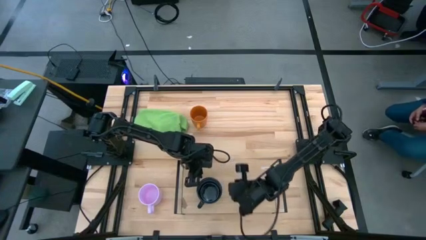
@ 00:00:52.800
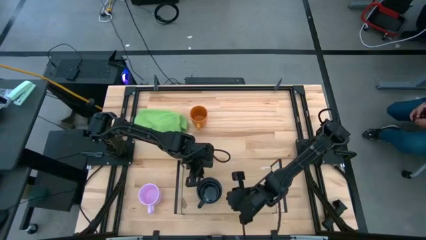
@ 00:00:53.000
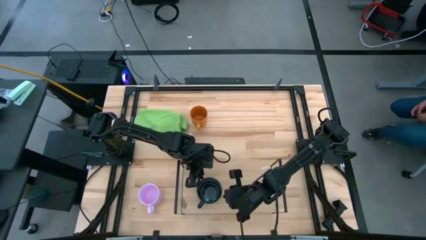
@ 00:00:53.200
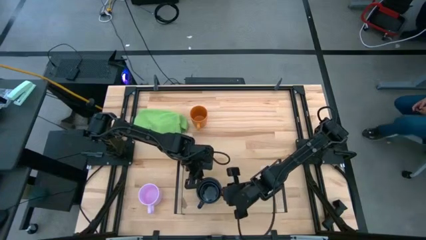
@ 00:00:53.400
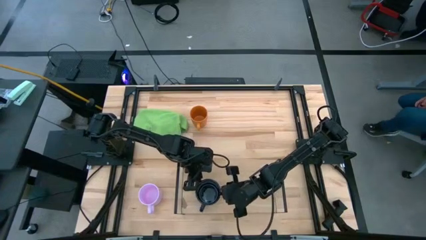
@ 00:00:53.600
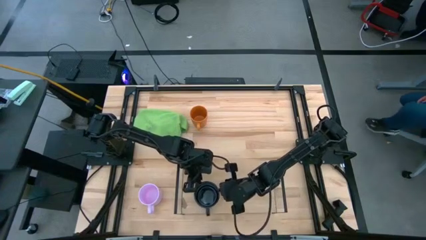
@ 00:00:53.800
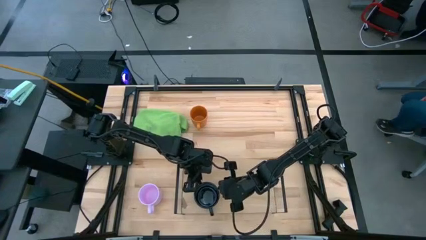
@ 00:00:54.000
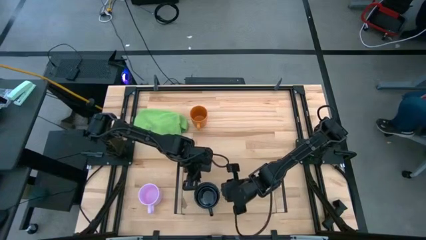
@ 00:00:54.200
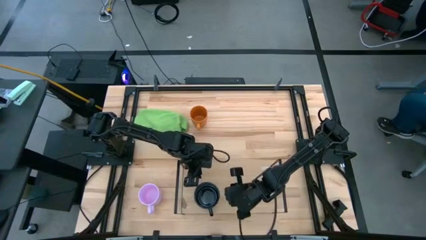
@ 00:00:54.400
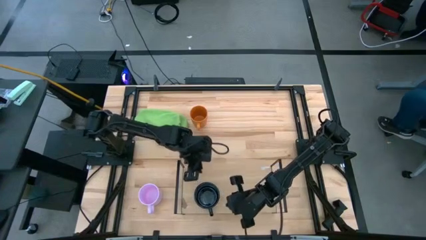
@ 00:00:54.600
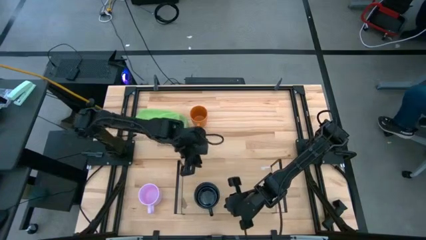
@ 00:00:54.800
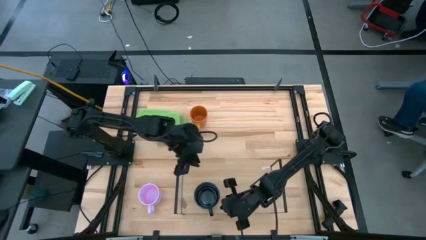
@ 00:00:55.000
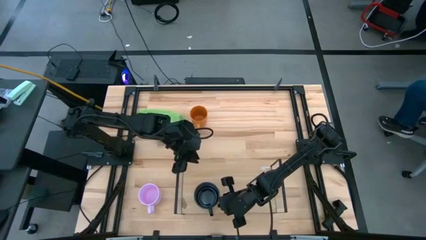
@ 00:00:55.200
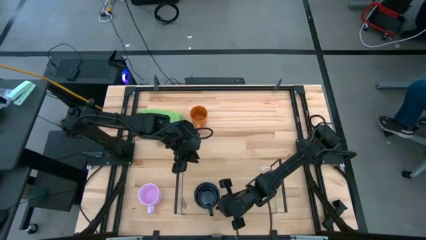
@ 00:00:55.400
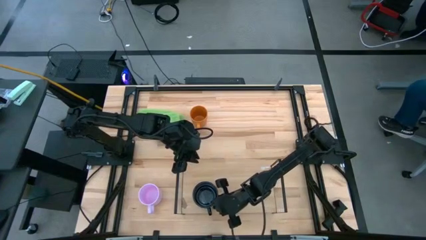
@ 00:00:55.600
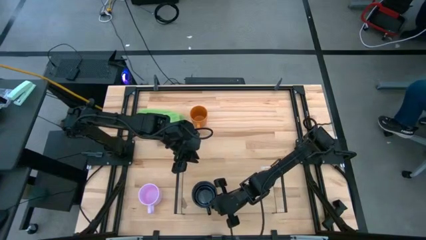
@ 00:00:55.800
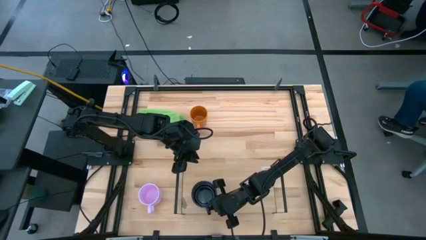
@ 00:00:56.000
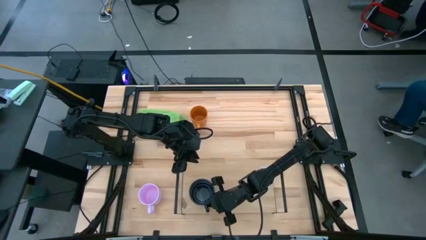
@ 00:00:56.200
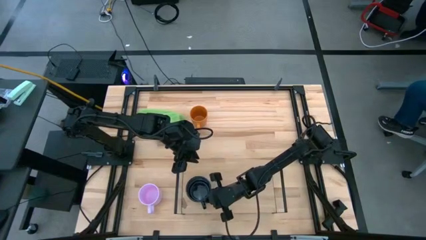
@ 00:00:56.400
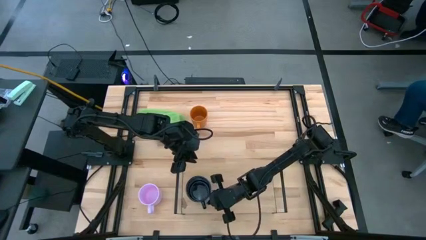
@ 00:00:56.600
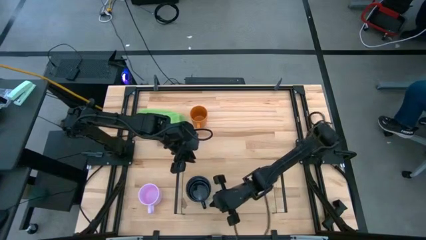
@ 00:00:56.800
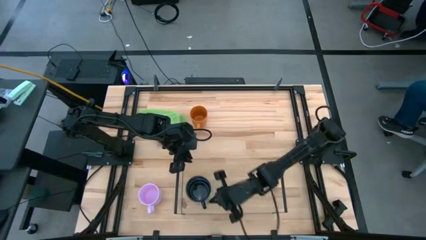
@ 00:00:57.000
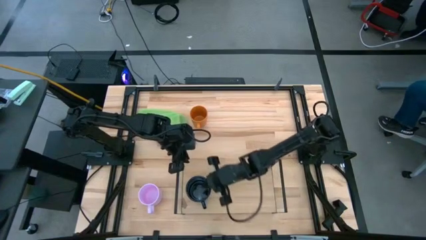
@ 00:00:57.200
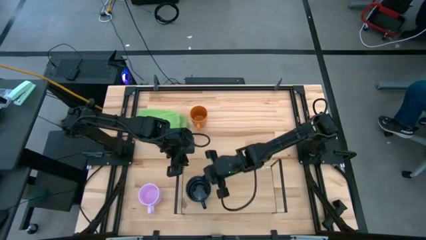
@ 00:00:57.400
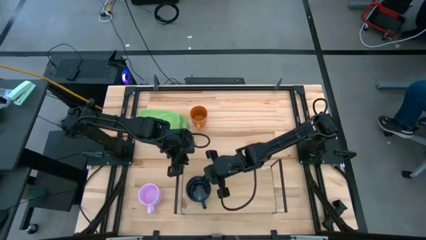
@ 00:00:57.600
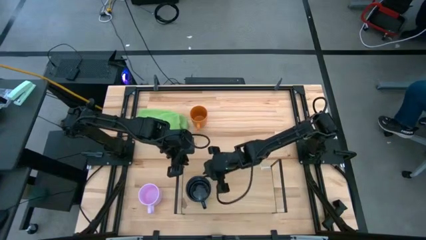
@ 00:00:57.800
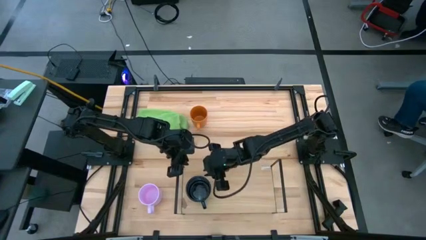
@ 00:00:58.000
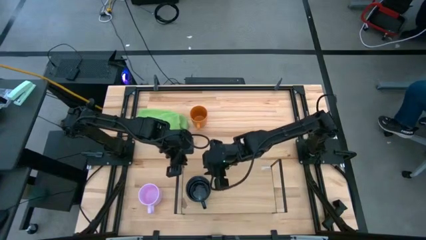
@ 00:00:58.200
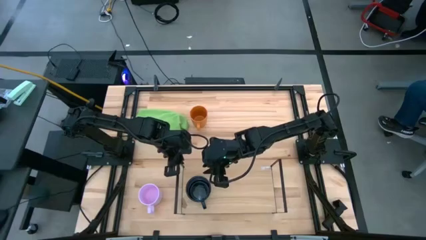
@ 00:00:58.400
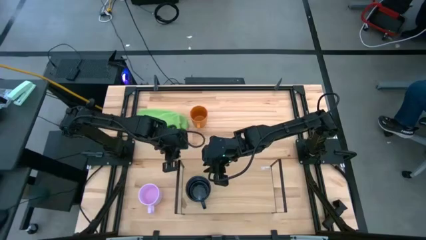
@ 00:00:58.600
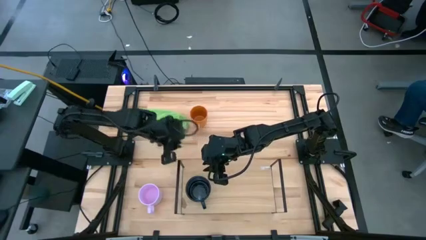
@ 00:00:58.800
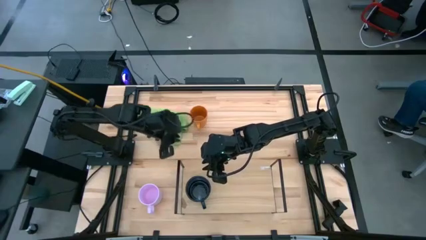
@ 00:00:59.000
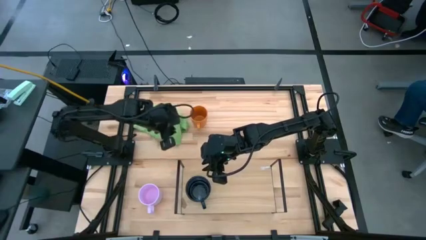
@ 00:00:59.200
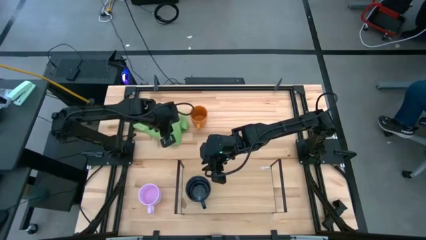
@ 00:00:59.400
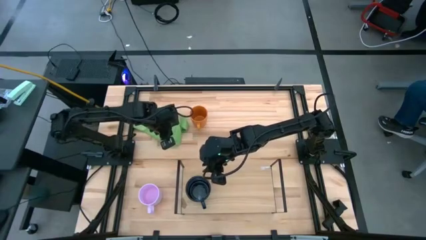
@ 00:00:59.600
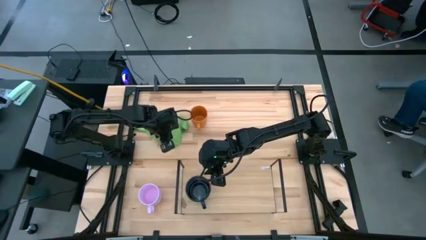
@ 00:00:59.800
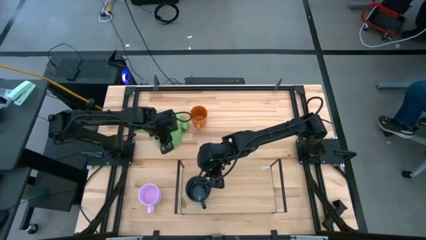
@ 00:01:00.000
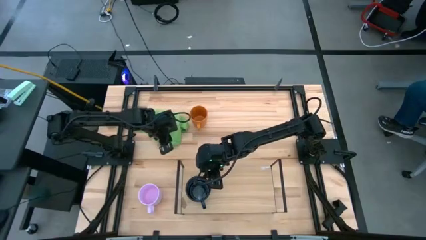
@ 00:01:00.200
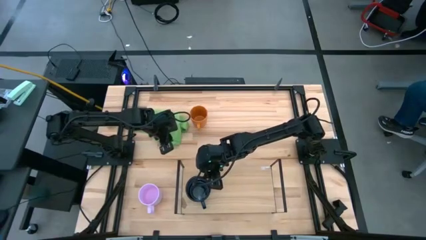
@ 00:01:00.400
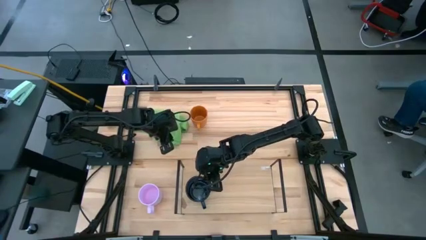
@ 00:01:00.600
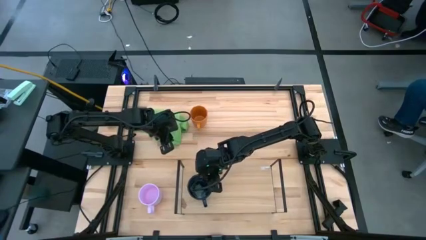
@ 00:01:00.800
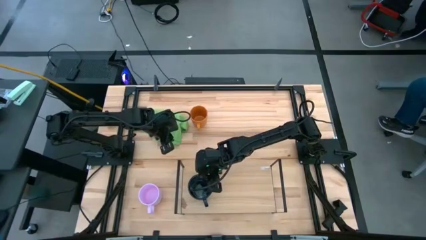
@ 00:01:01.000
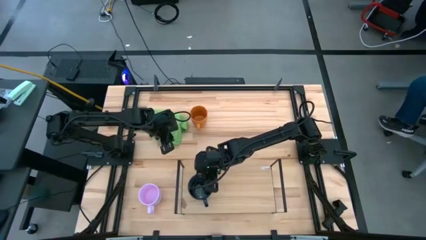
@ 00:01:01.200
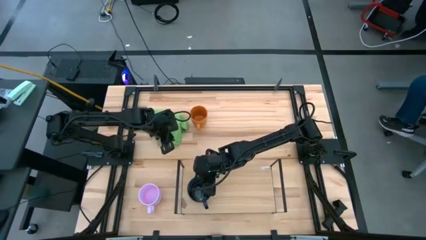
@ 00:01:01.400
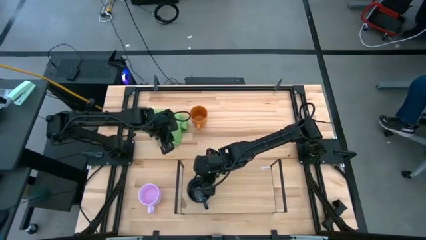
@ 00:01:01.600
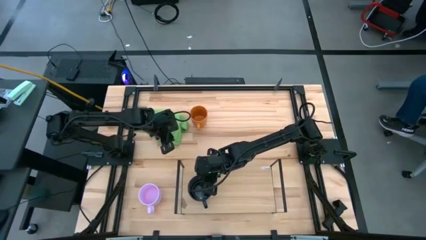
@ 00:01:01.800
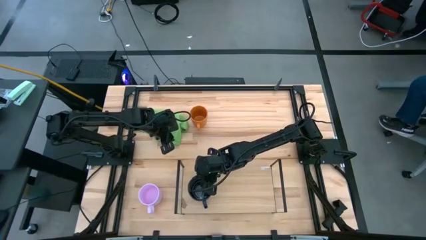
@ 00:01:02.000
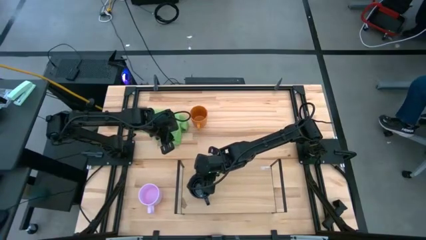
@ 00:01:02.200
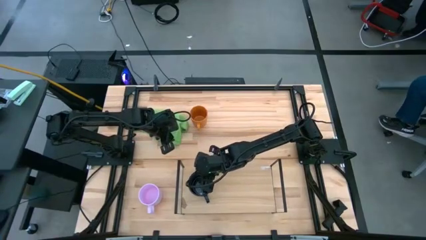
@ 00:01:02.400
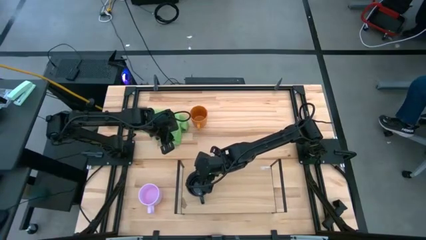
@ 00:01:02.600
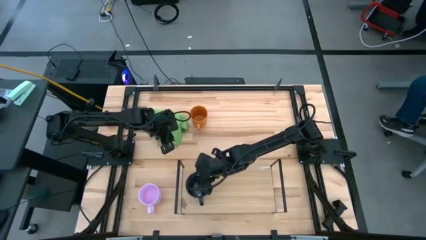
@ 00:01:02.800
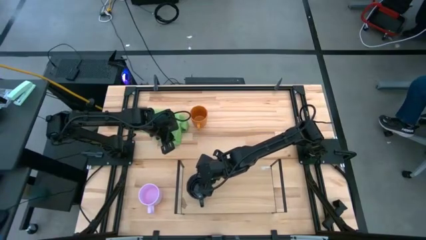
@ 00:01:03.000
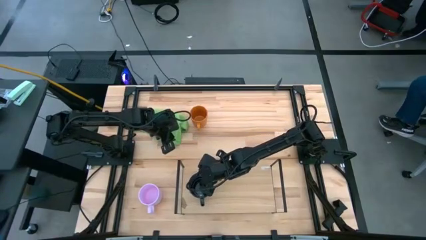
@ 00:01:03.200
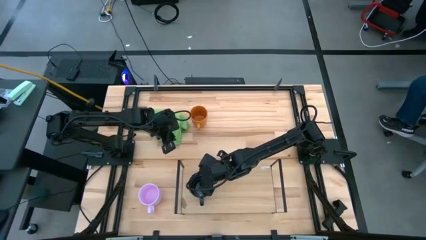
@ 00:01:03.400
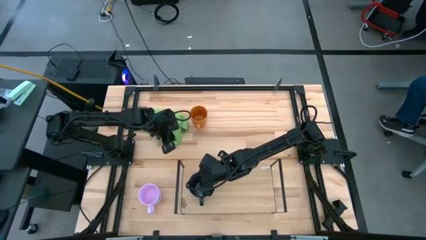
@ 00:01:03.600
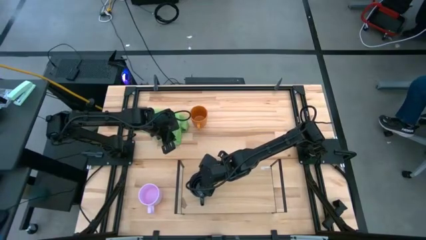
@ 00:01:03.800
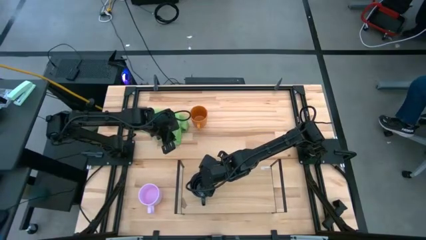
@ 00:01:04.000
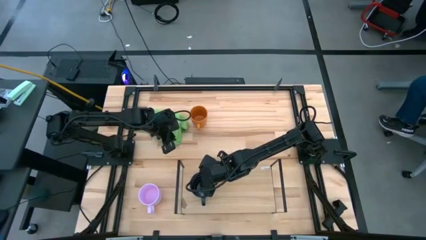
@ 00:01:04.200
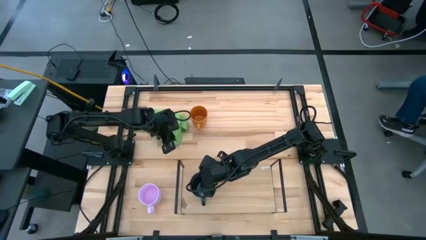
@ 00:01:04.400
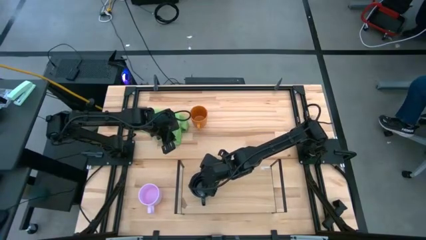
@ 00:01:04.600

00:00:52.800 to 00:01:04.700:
Task: Stack small to large cups/mugs on shelf
Put the dark blue mug on the shelf
